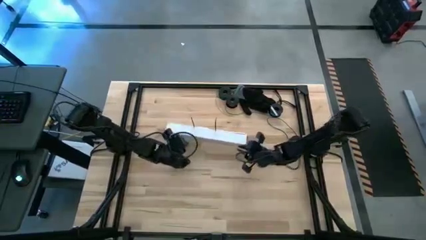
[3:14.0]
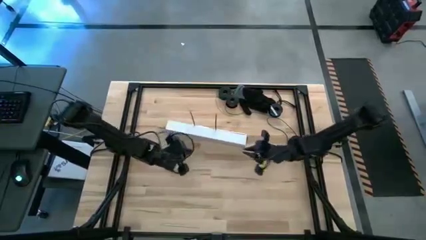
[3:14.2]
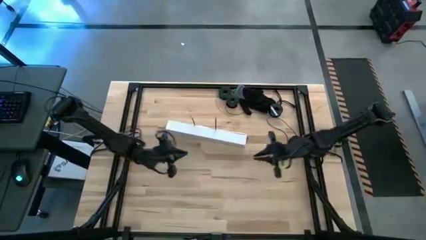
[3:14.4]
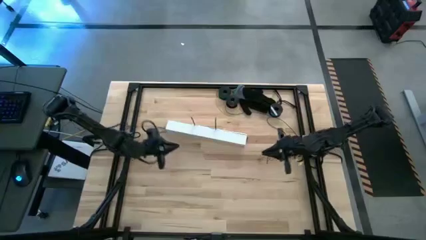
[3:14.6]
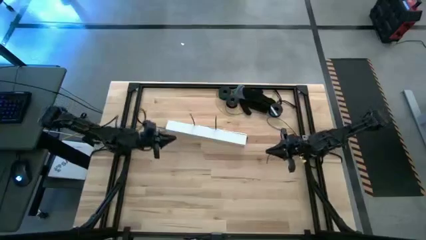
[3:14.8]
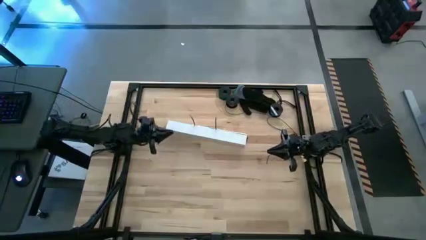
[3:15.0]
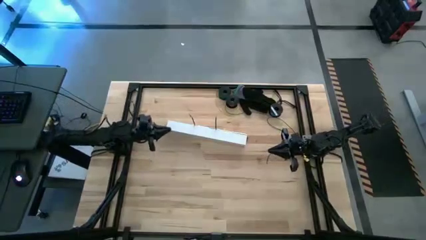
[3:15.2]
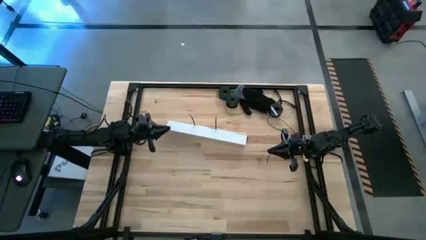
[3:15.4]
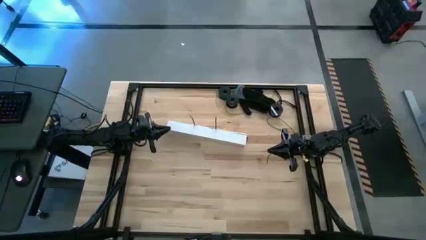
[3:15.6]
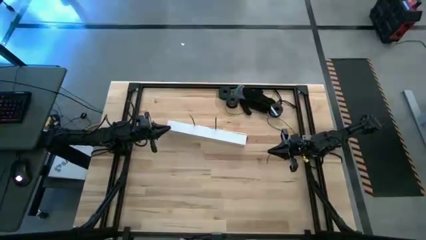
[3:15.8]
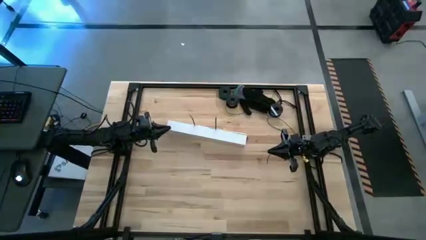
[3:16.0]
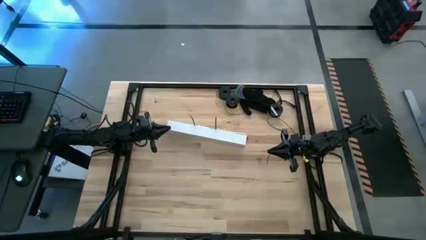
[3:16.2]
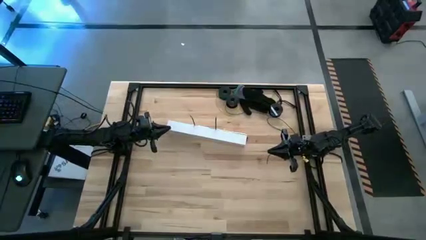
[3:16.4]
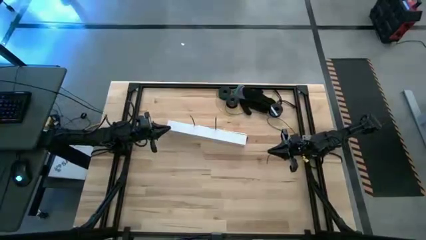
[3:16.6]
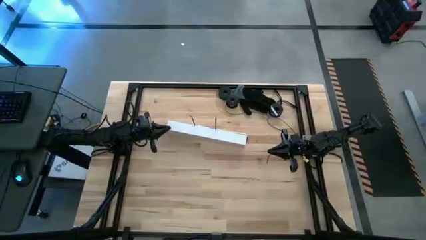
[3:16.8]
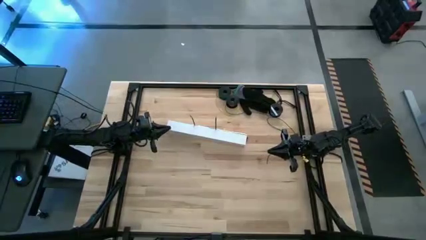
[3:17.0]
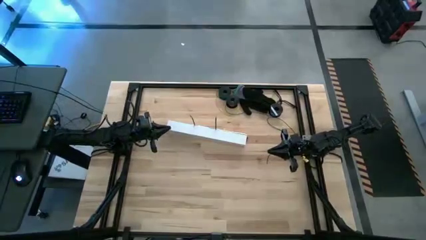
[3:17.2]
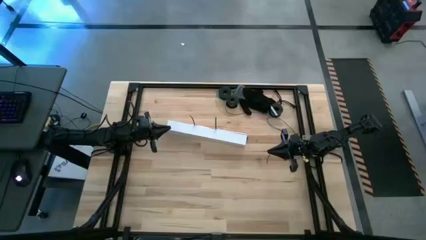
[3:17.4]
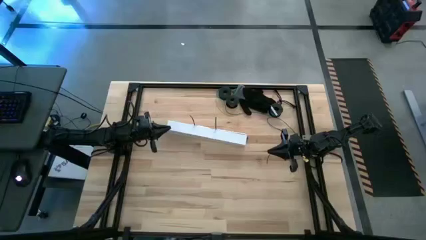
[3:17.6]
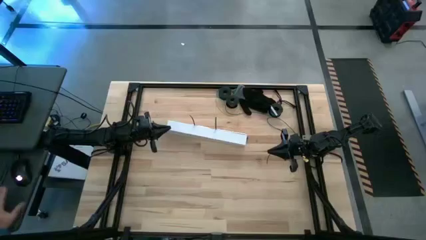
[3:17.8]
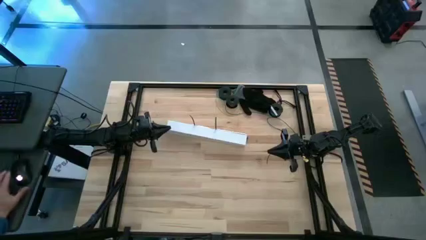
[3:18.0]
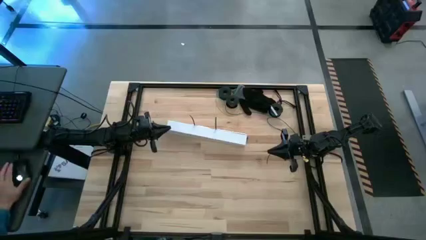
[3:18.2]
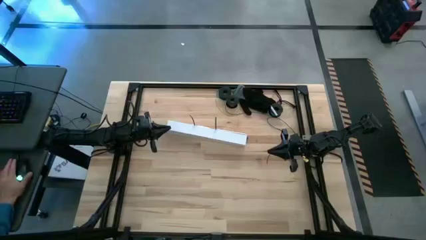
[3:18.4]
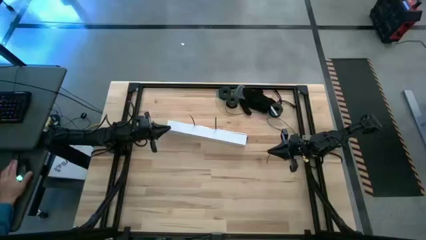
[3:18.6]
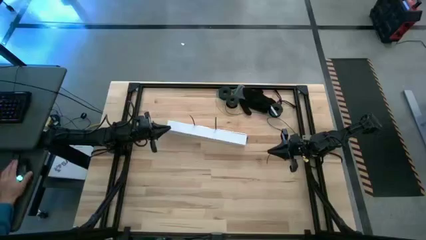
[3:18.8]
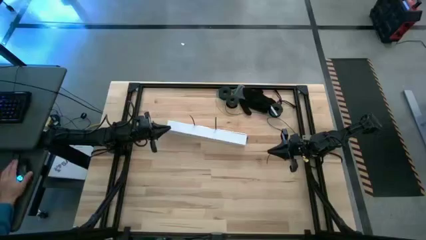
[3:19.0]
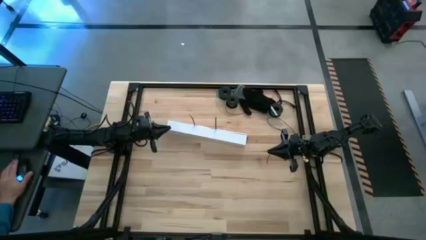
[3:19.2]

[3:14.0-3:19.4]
Task: Ziptie cables
Return to Home Position

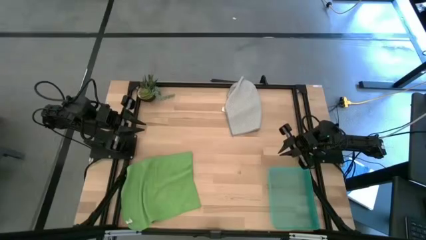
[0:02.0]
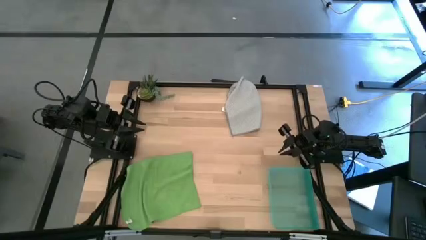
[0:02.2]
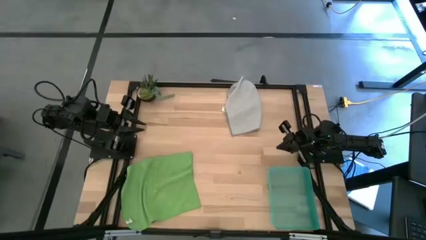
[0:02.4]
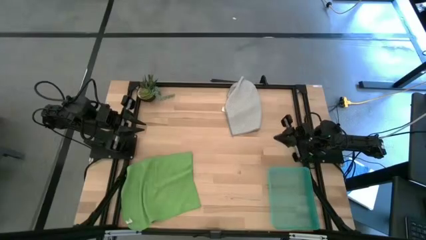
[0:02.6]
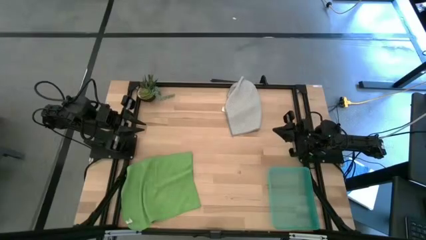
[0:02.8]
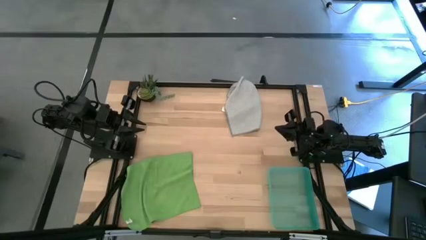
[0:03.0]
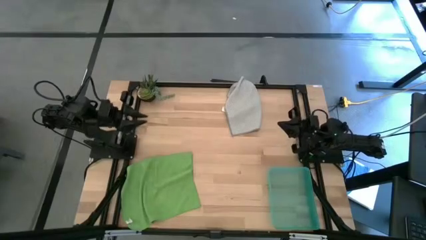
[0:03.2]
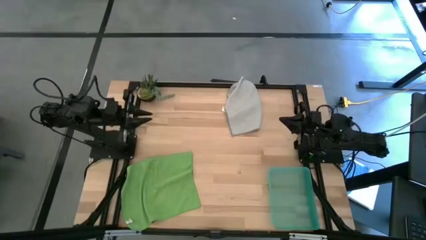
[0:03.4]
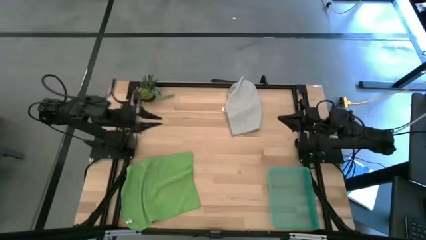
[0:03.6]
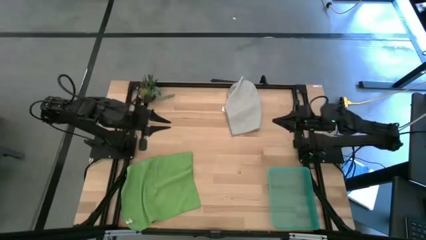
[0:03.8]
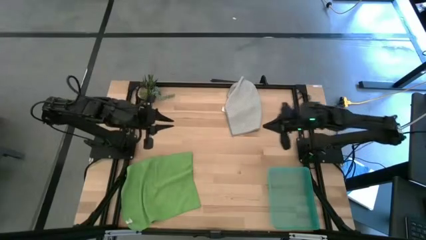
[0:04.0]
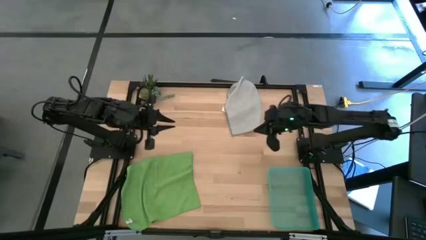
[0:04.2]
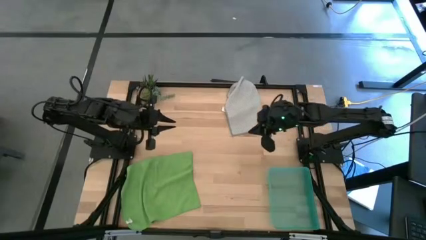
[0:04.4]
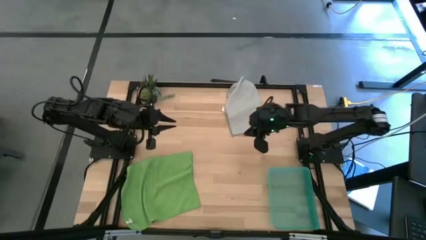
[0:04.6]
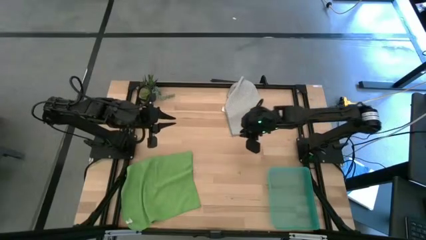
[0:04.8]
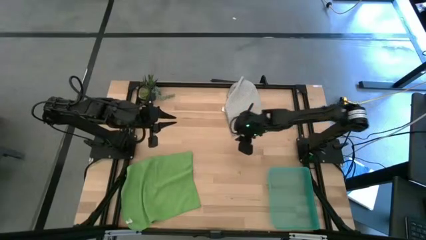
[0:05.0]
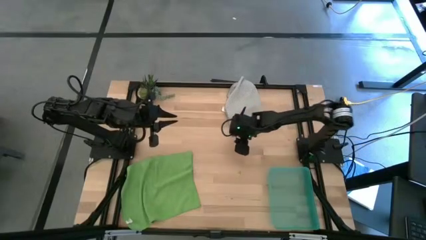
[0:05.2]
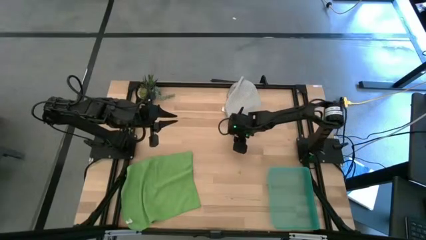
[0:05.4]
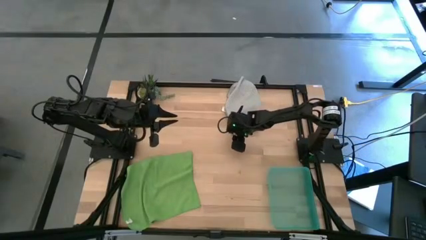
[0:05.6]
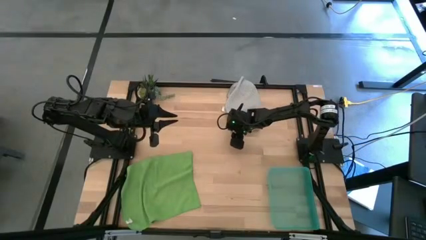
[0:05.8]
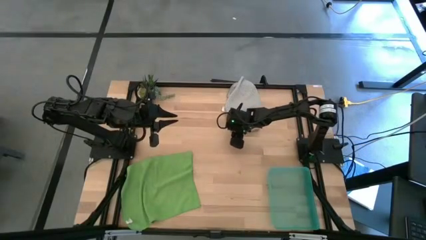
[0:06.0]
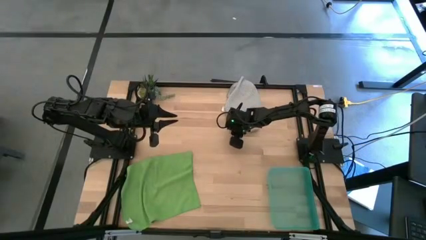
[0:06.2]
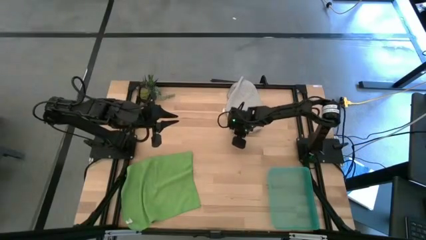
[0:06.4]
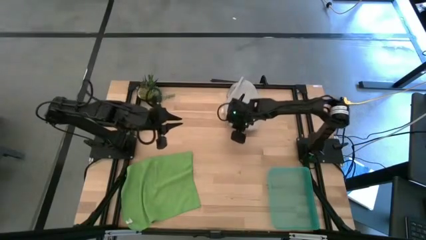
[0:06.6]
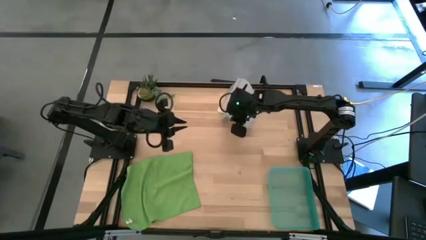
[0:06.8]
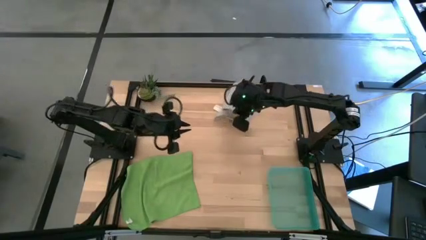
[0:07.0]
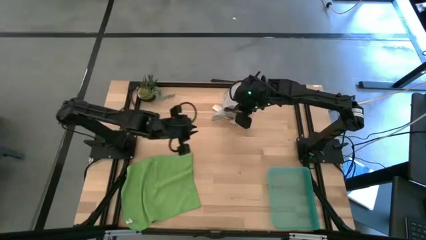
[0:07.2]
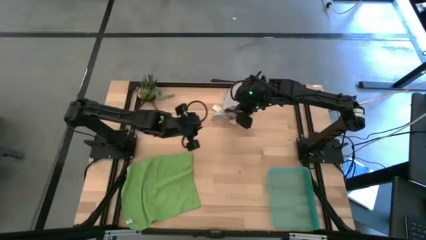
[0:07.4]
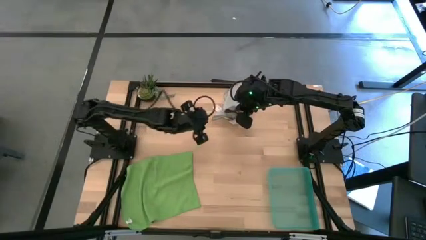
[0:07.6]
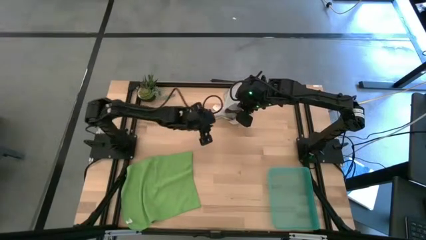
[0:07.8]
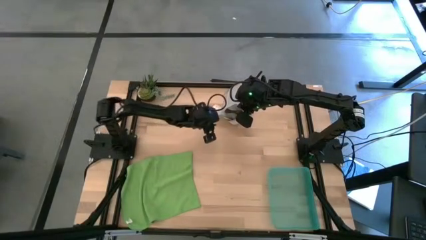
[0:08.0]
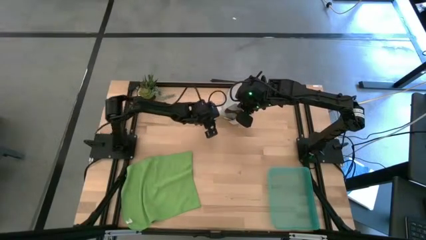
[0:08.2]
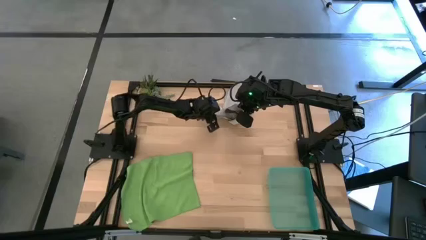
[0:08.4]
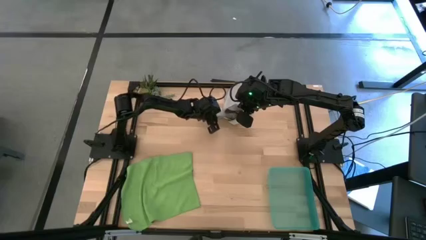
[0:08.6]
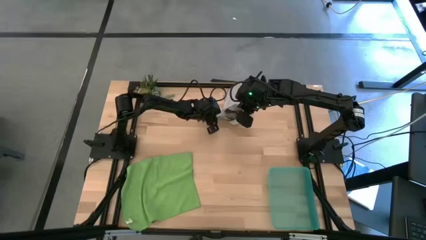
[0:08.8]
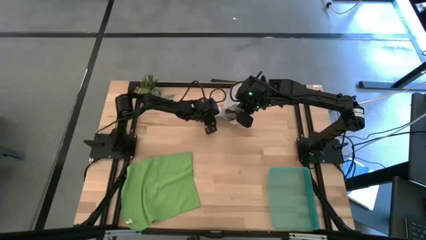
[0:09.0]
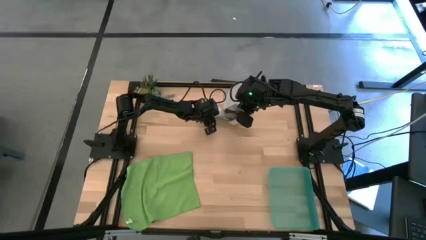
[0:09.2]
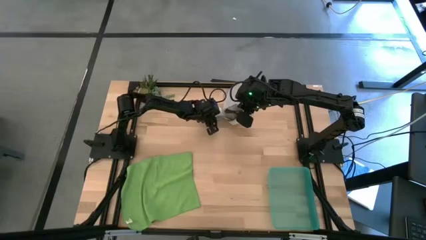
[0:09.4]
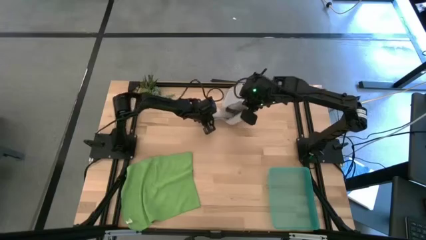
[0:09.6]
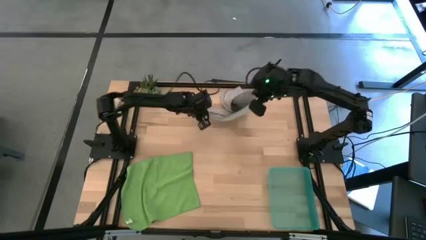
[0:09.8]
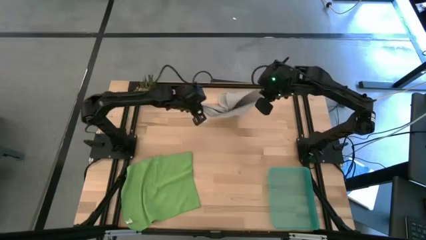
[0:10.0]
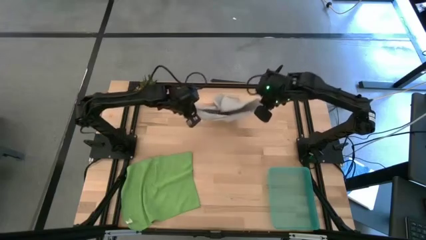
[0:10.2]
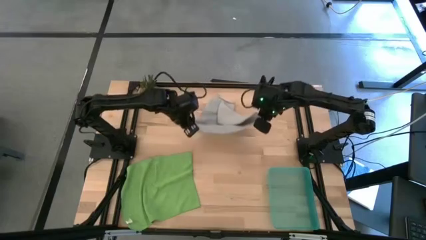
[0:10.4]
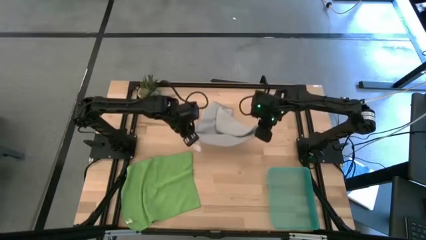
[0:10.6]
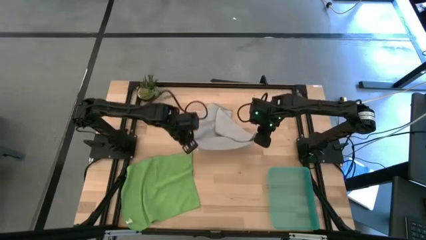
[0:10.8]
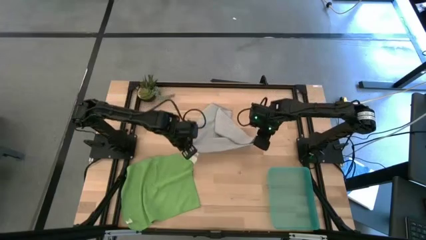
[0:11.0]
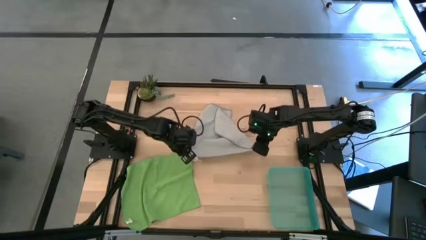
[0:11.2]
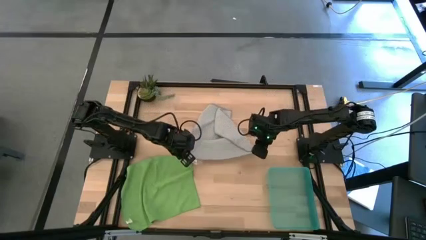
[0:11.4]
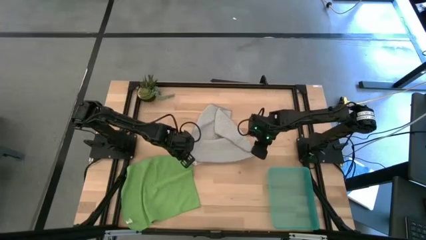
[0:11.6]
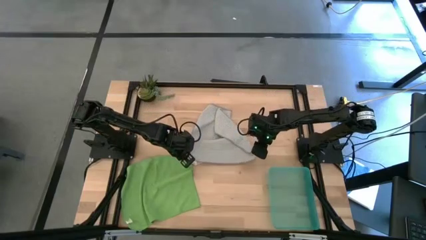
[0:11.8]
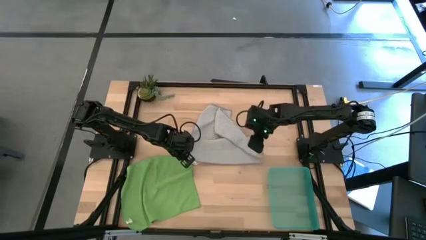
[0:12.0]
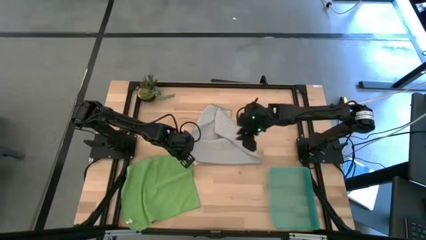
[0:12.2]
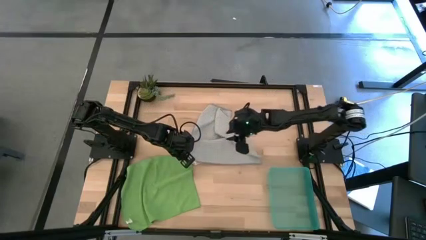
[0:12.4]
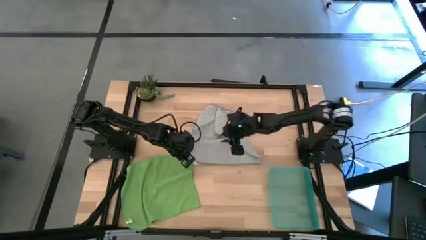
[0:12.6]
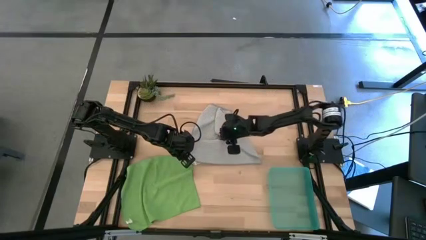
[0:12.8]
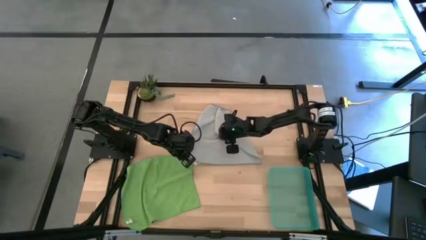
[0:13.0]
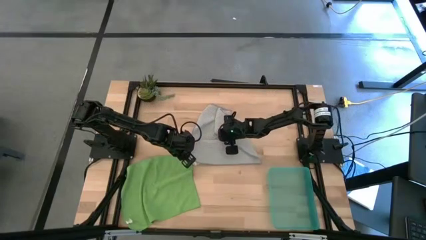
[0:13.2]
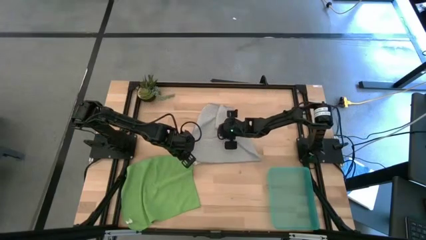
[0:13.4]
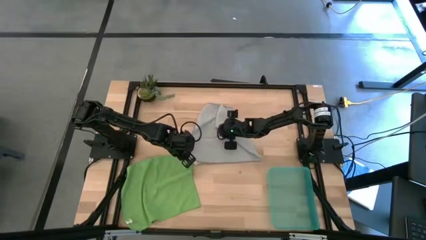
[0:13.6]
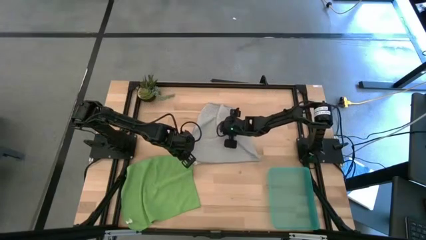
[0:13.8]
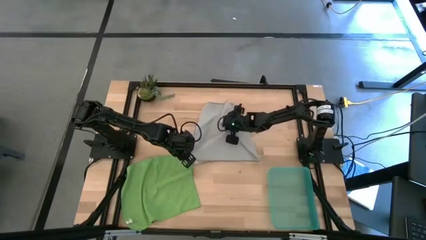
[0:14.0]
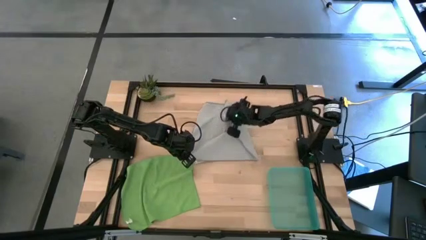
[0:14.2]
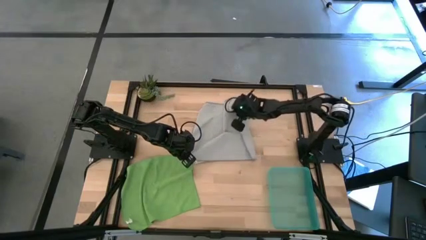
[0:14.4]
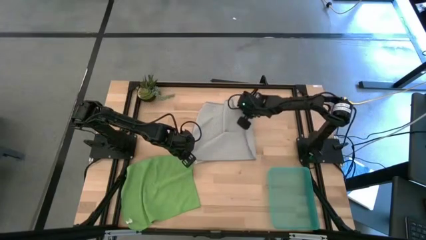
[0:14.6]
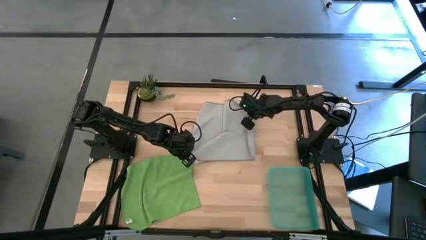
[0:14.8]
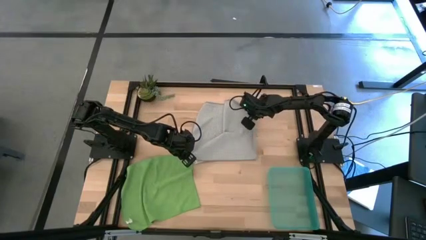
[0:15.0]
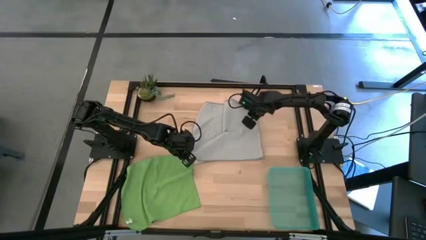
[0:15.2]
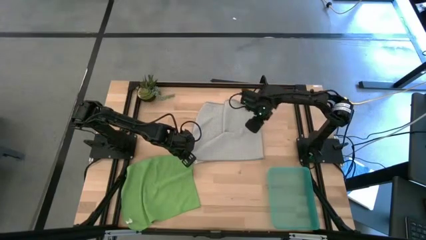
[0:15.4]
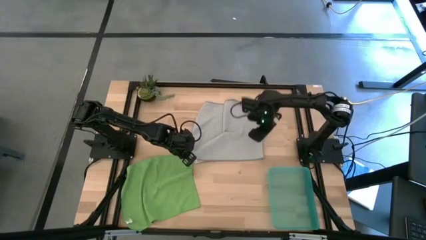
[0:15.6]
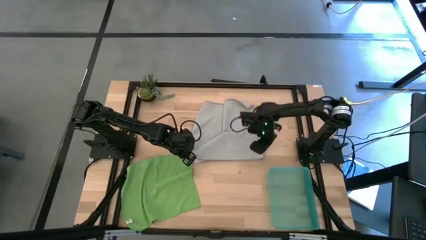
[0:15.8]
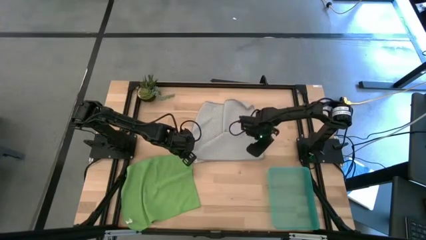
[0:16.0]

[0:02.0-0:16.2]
Task: Roll microfiber towels into tight, uniform cylinder then place into a basket
Fold the gray microfiber towel
